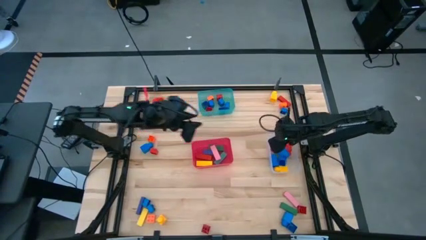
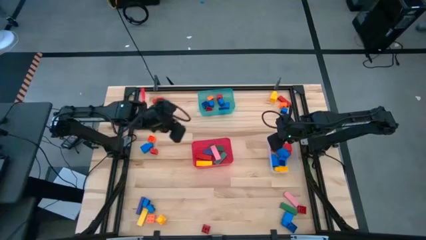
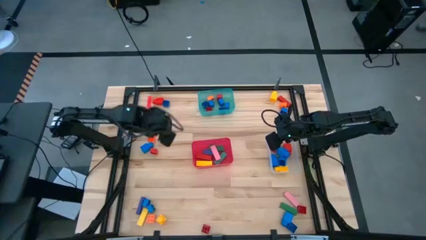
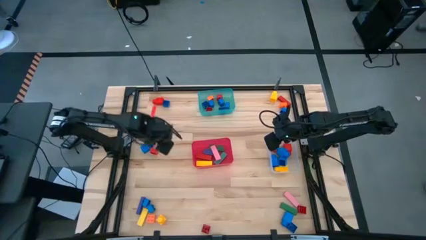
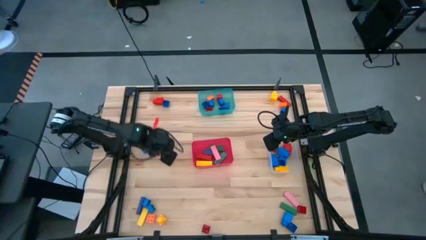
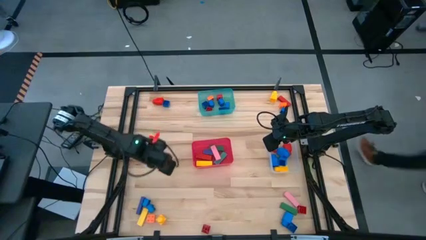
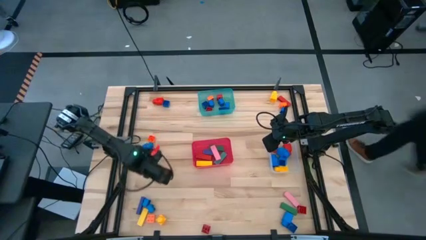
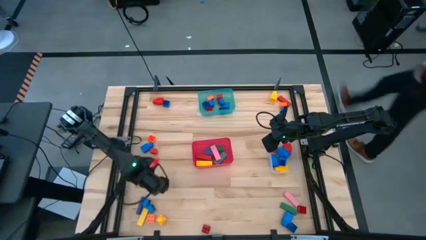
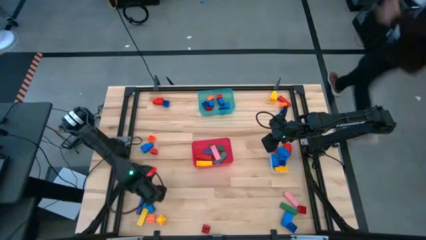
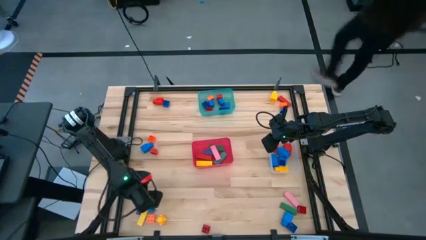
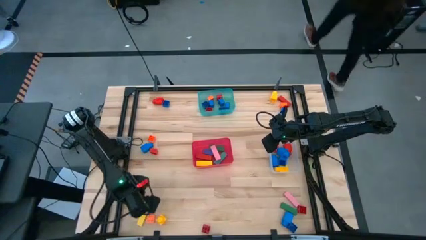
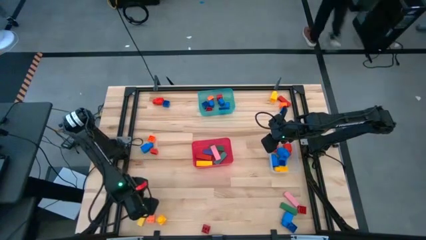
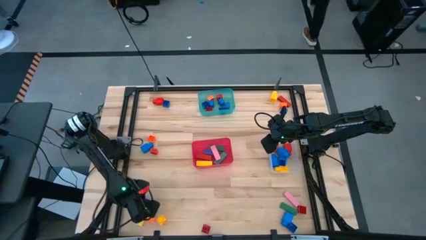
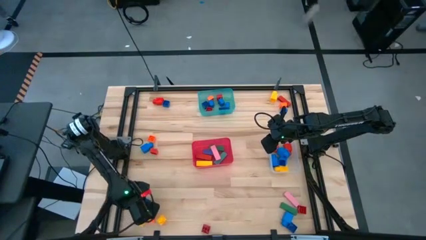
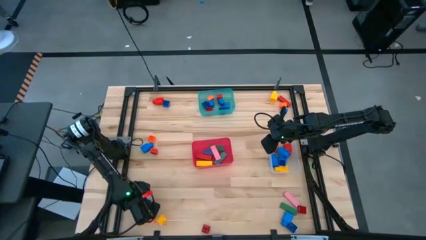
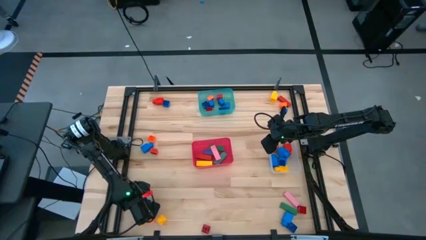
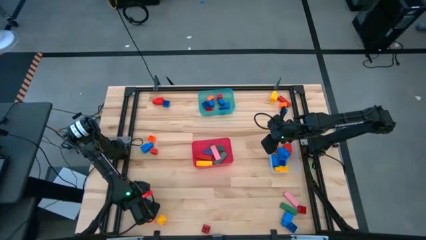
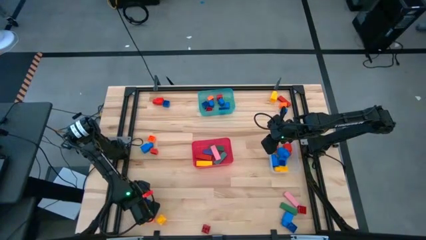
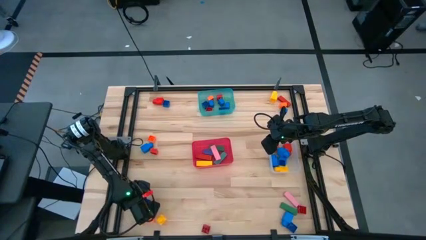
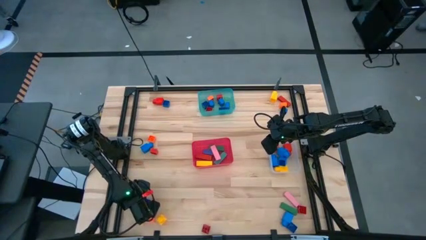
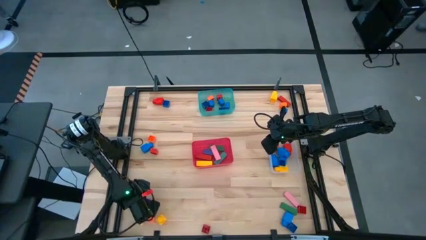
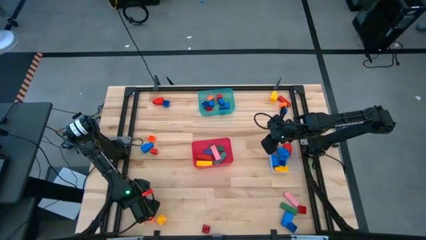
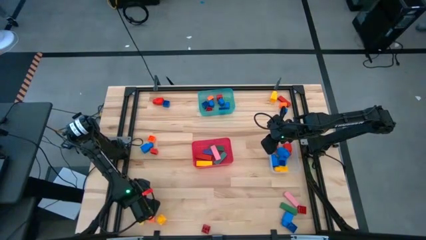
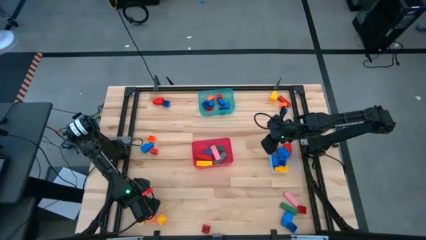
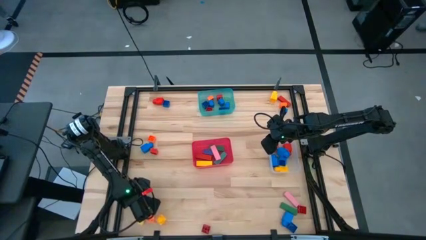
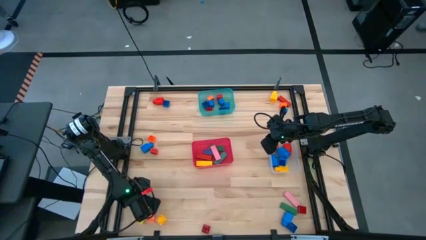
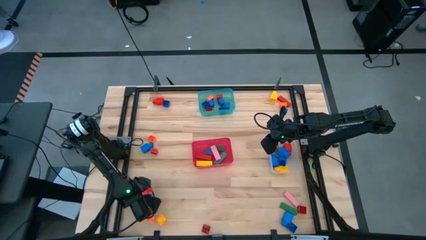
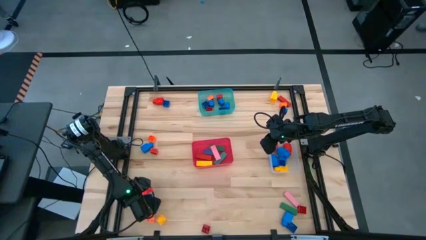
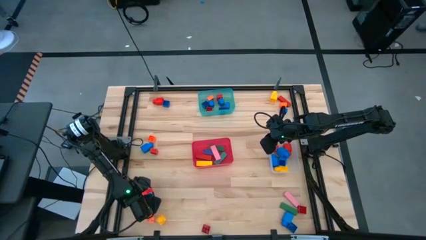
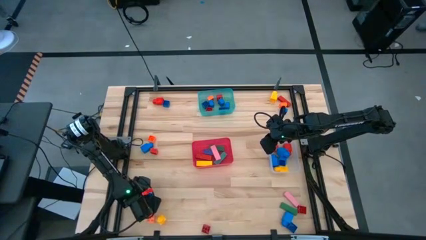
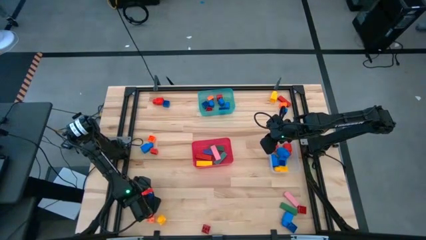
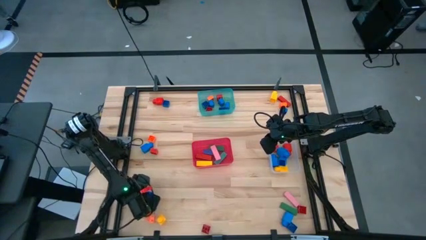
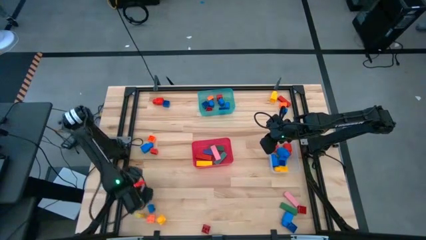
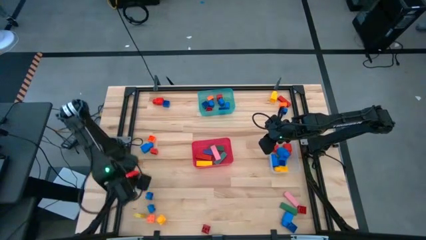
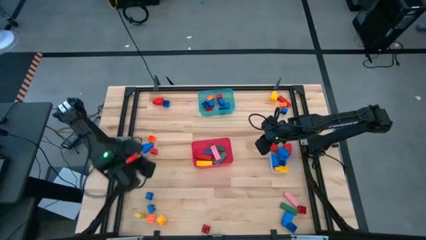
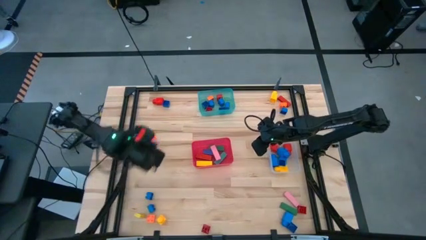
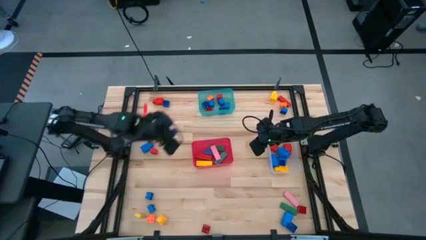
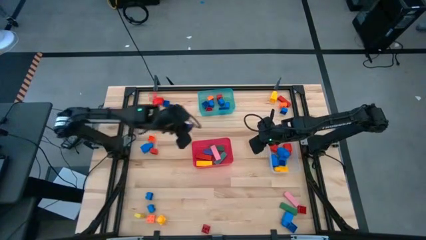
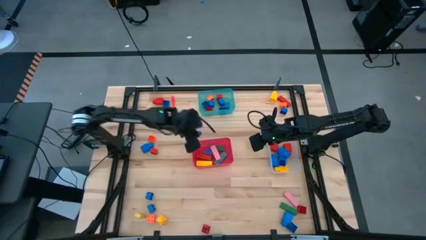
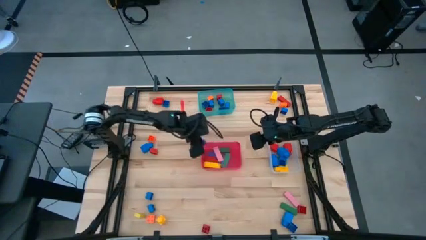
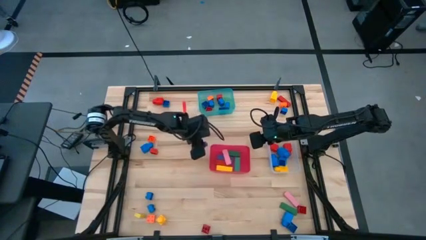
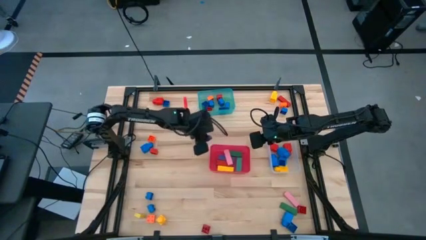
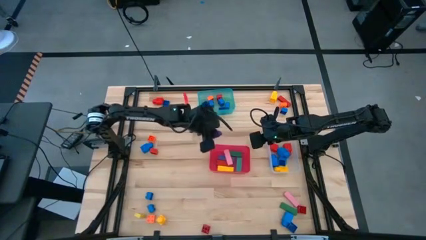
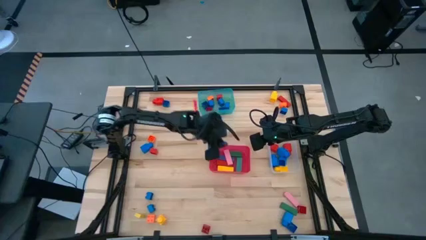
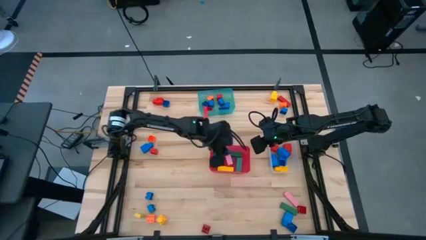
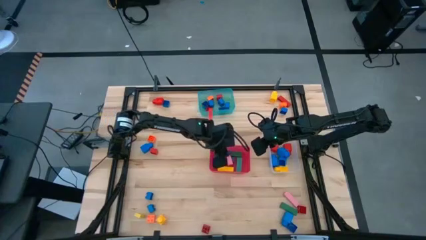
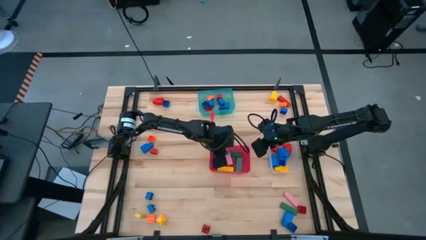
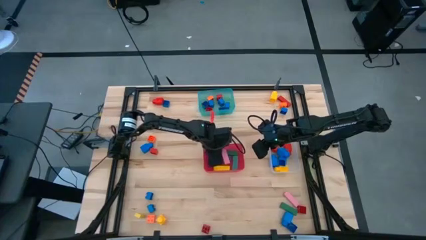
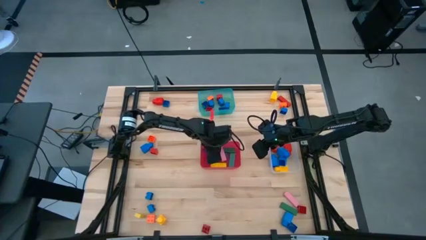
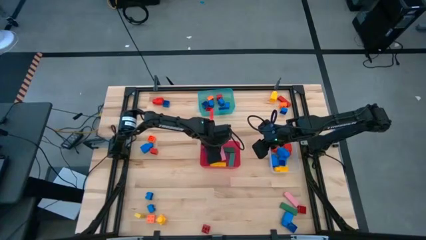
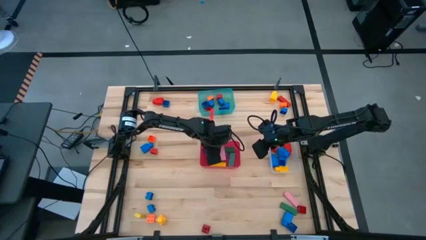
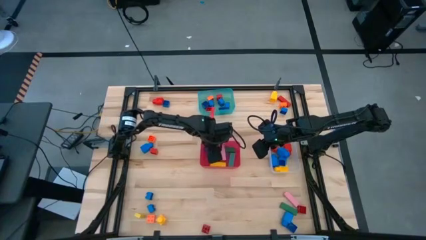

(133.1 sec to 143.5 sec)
Task: Sort blocks by size
Put the blue block into the red bin

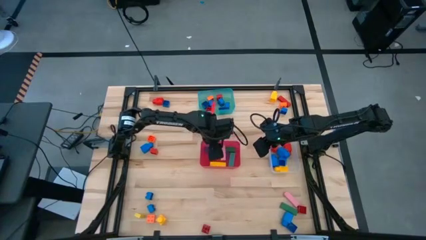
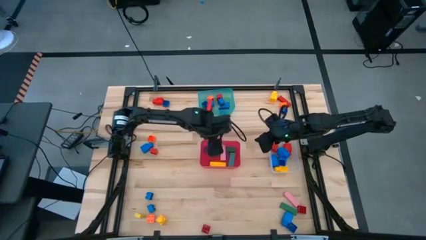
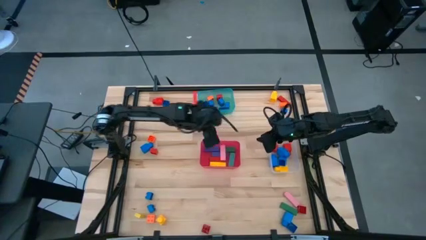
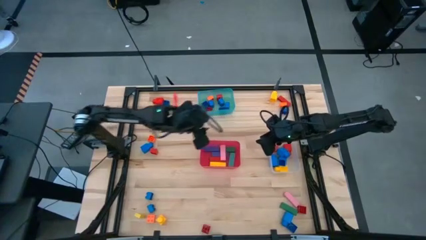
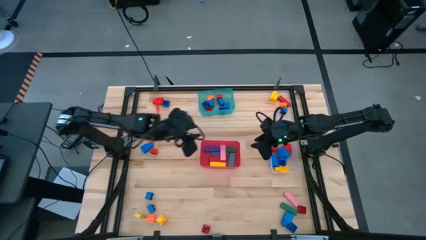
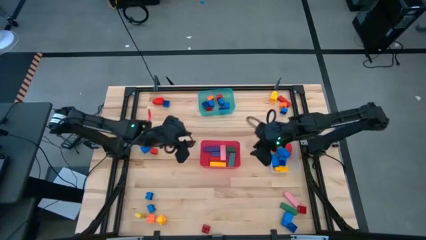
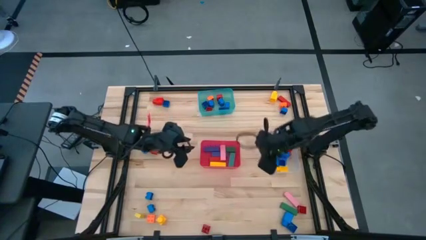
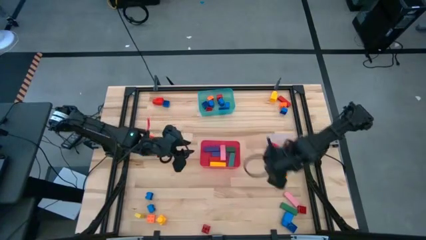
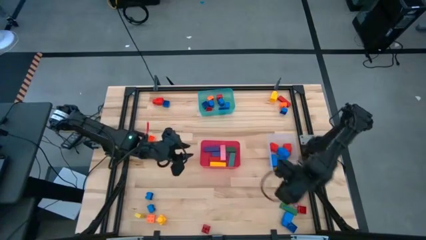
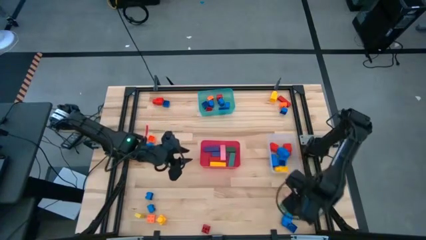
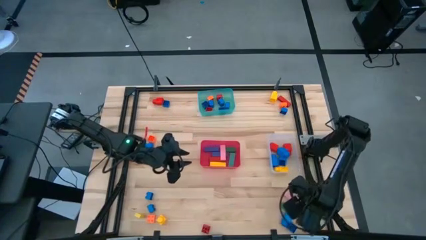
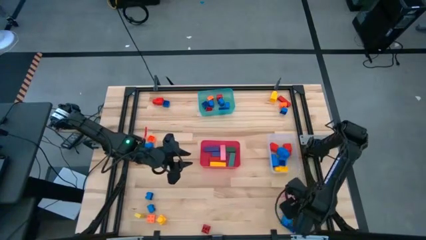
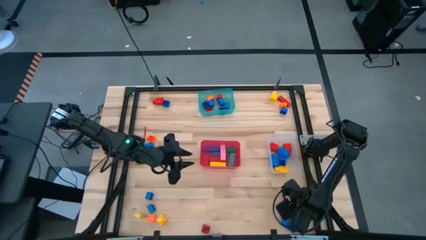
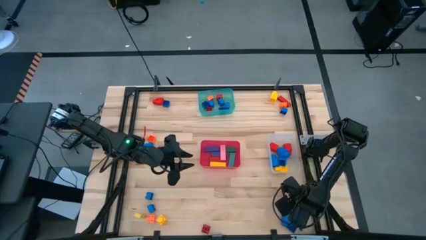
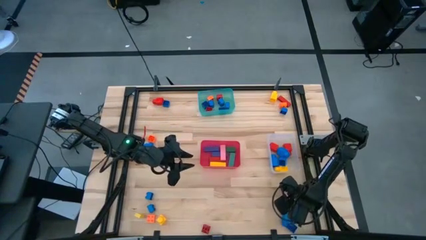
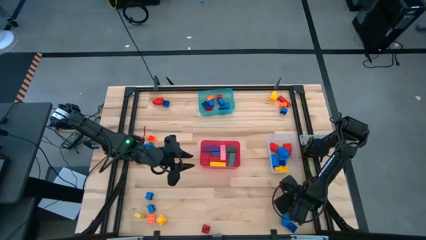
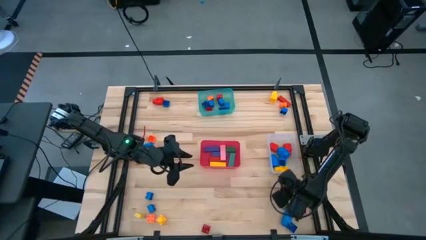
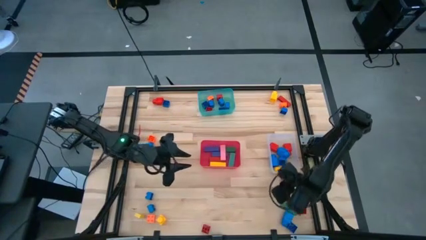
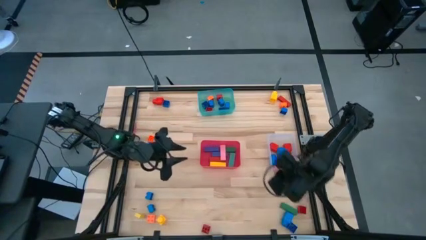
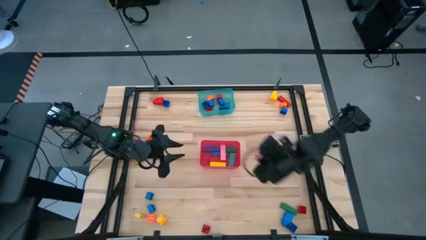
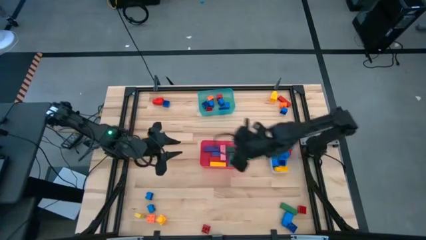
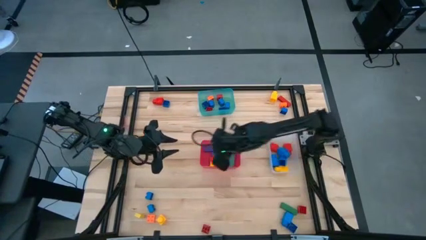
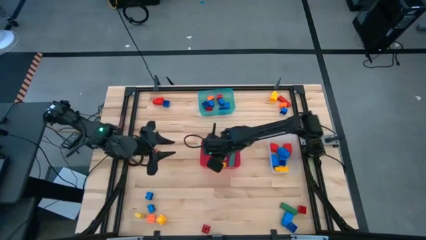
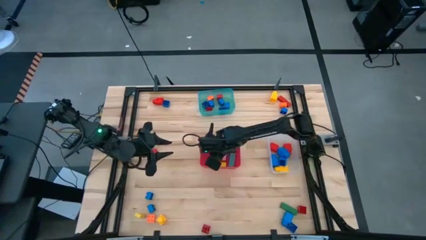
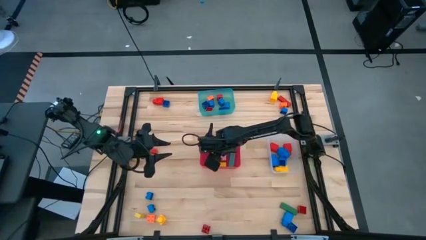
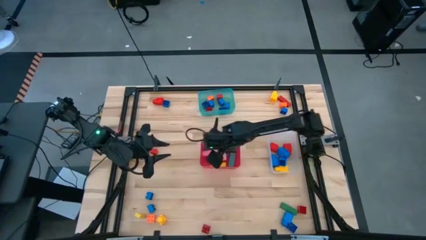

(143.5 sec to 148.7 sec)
Put the pink block into the red bin
